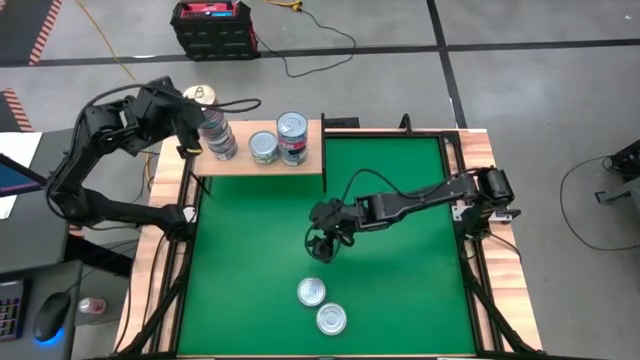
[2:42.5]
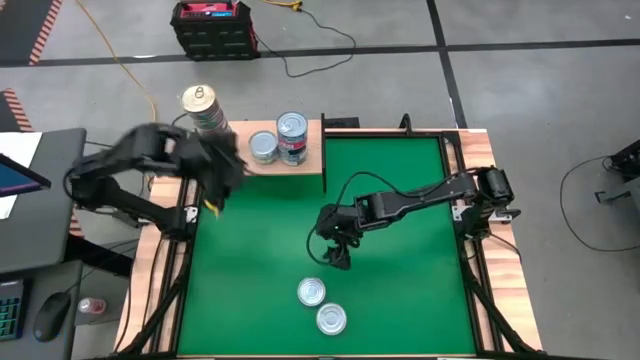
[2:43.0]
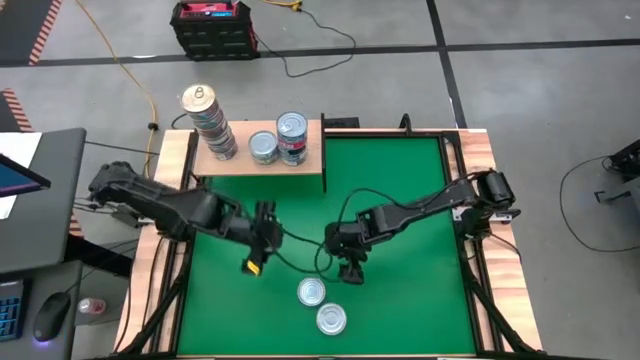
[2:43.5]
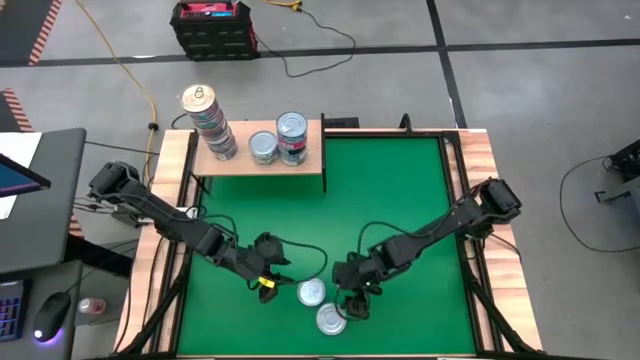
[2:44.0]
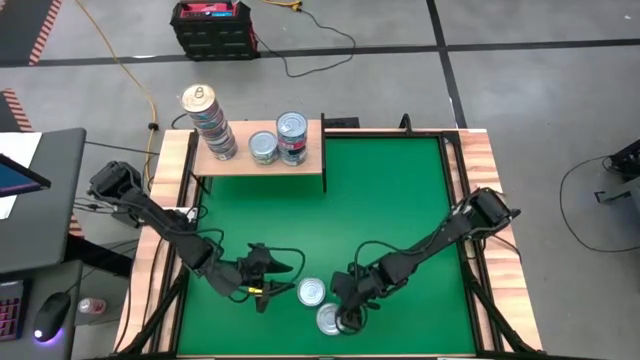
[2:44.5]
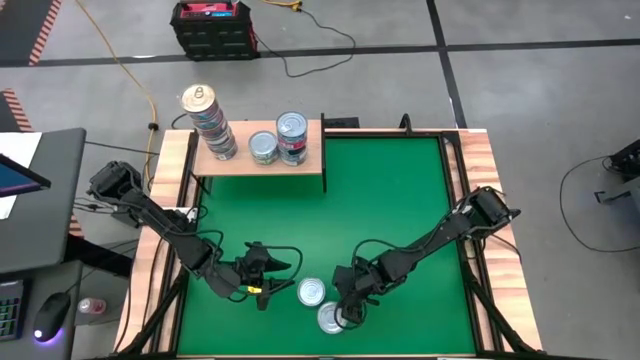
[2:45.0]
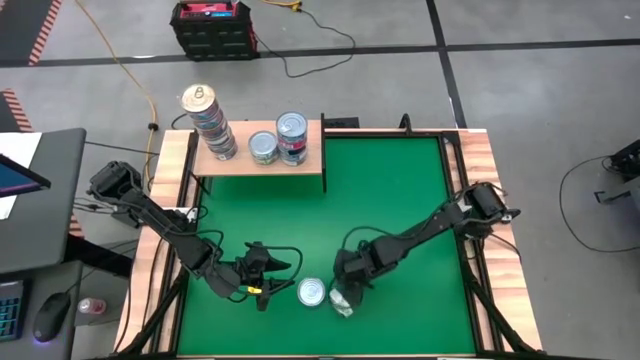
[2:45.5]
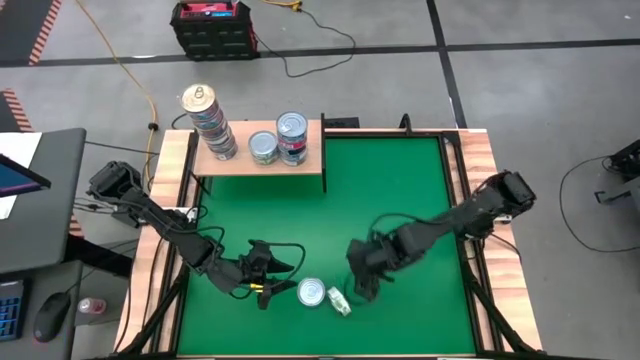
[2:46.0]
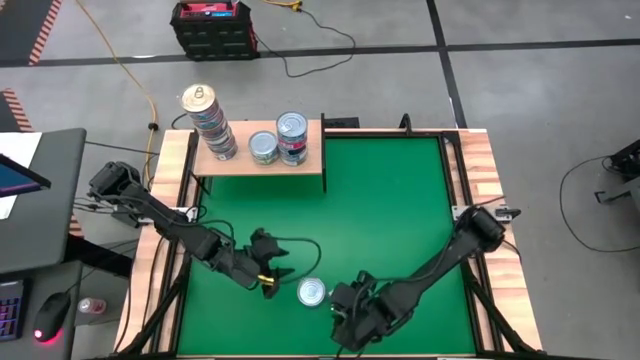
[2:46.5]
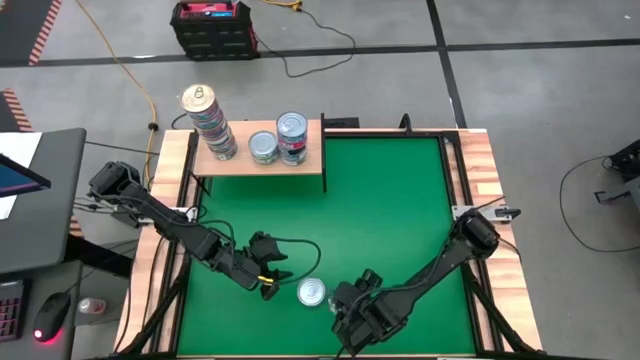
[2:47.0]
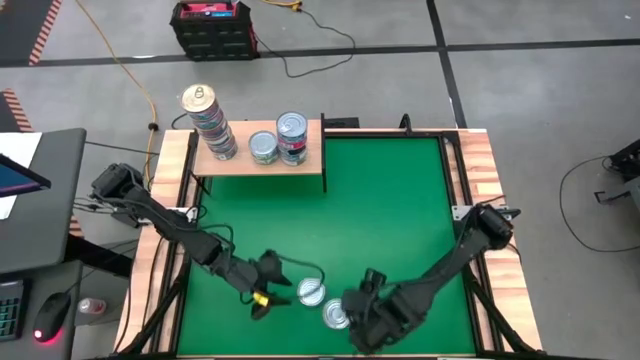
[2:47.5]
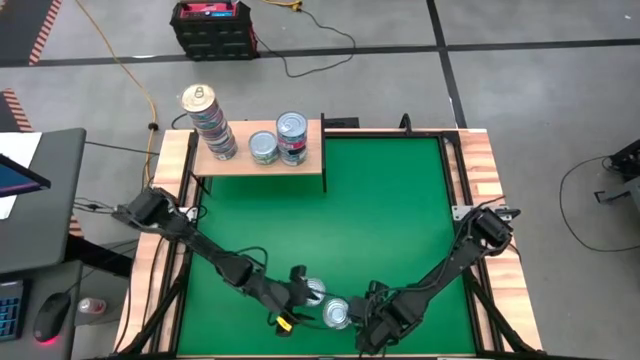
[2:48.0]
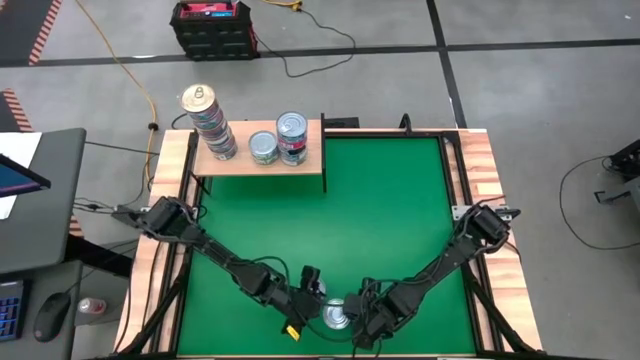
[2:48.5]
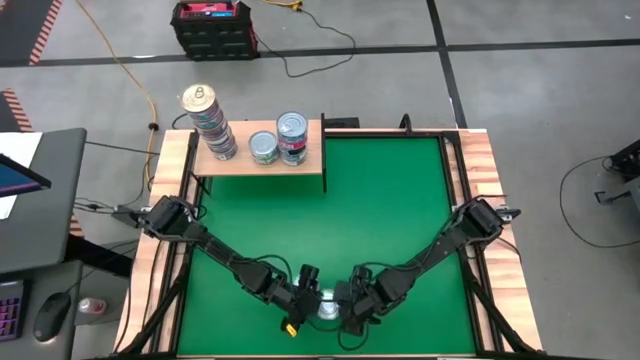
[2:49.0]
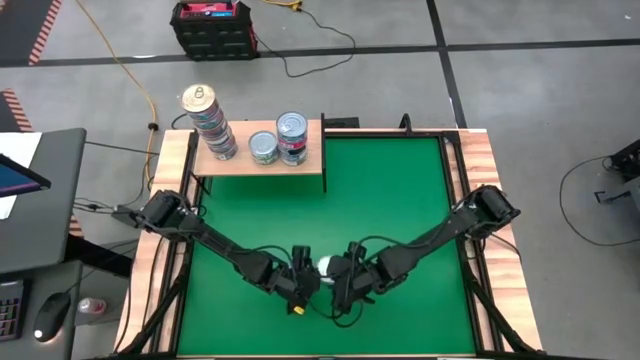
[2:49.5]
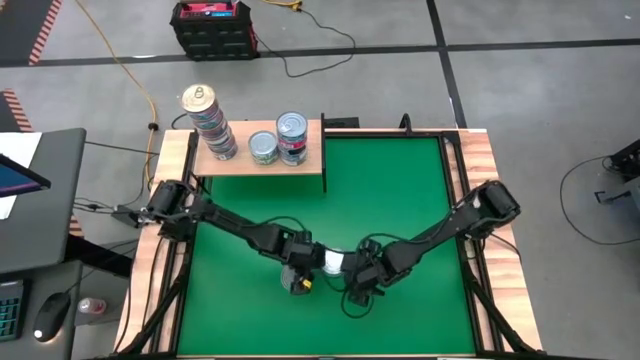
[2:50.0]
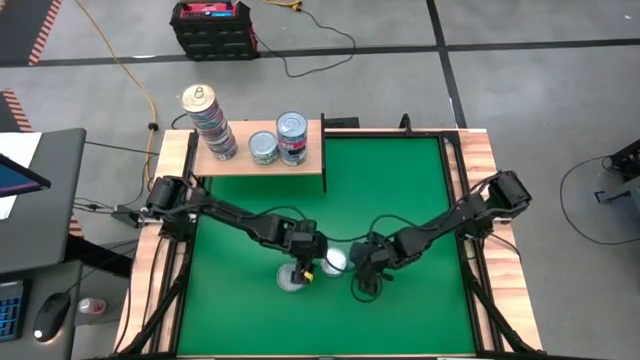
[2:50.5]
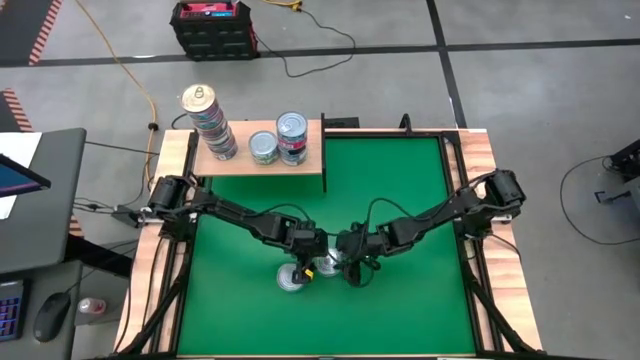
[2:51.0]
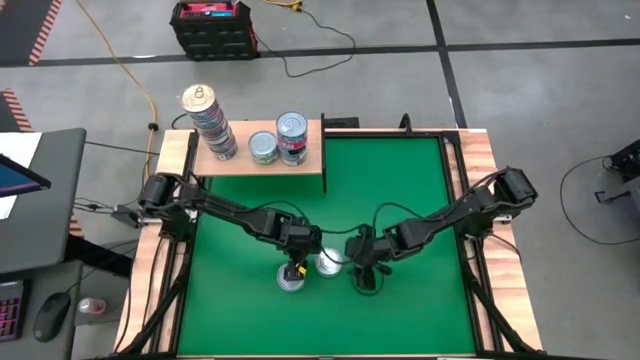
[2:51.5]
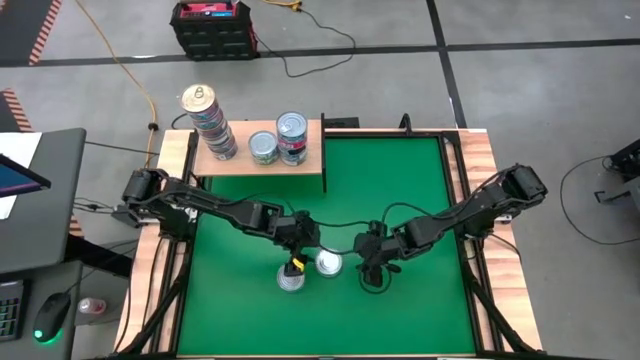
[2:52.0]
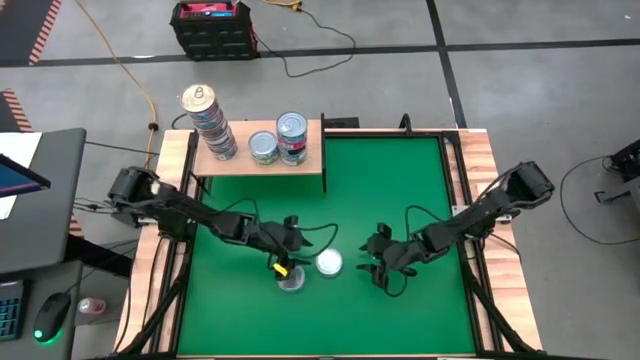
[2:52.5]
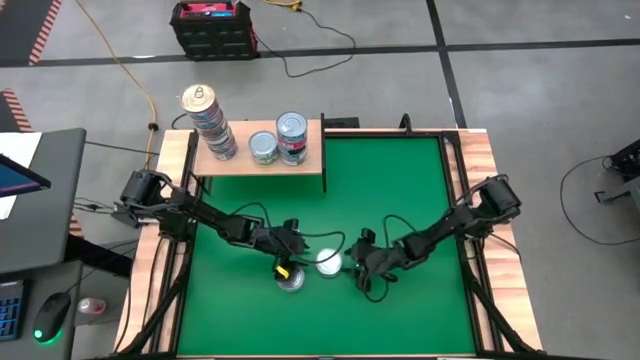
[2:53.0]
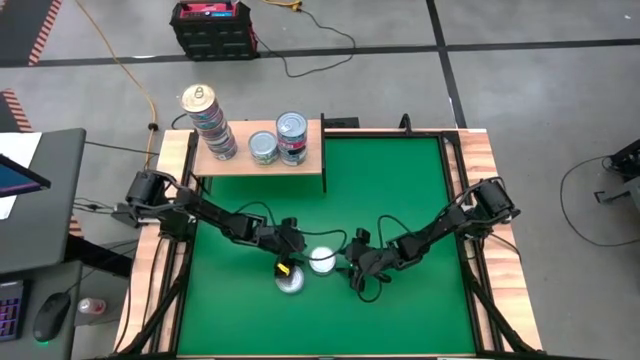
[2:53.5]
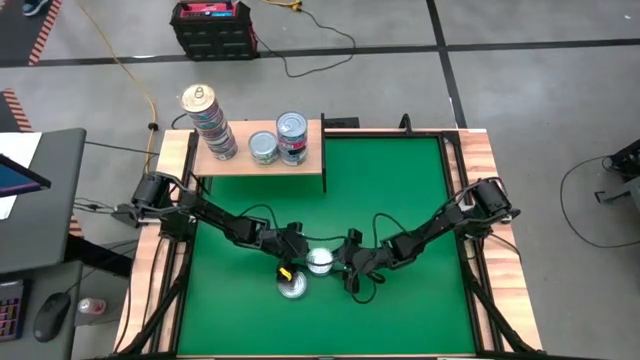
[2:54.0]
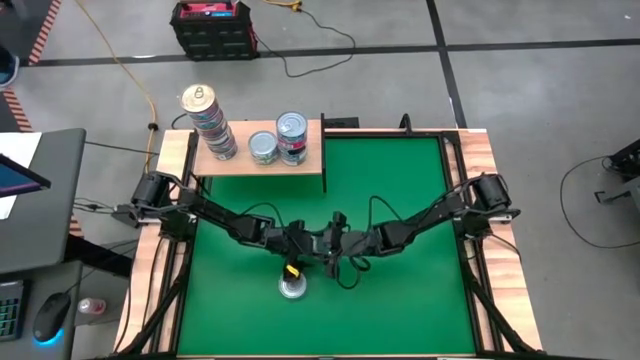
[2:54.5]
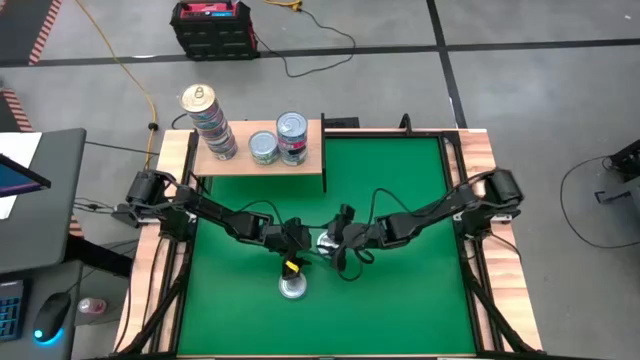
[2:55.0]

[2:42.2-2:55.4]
Task: Stack canned seafood by type on shelf
Stack the green tuna can on top of the green tuna cans on the shelf

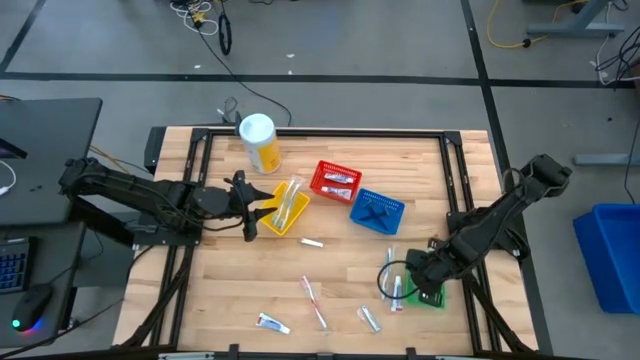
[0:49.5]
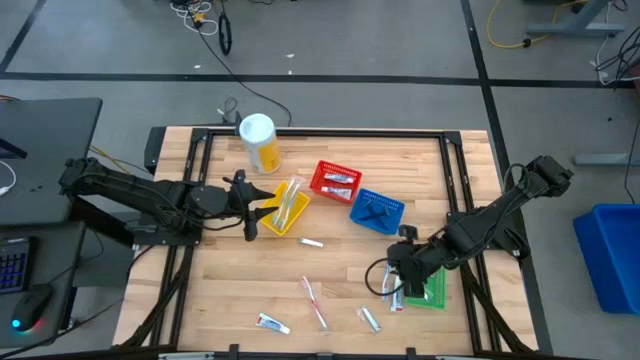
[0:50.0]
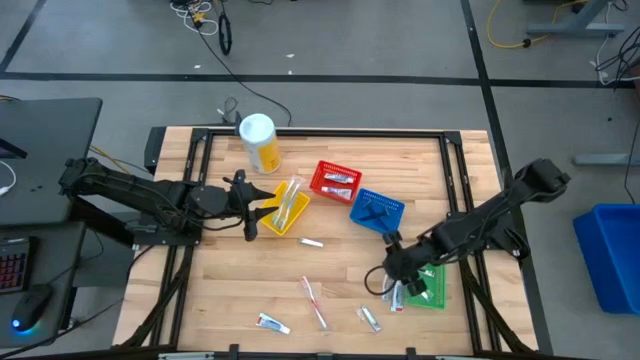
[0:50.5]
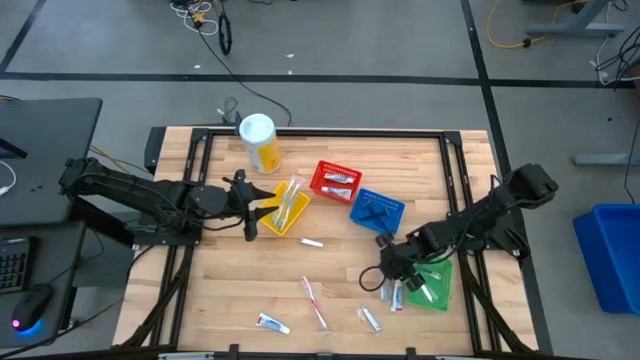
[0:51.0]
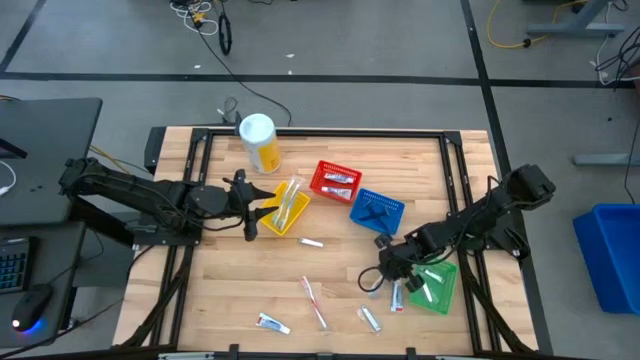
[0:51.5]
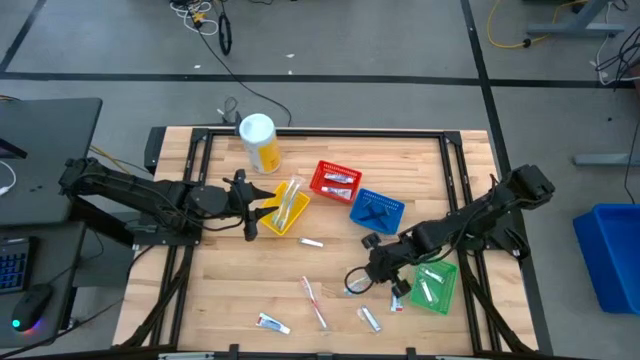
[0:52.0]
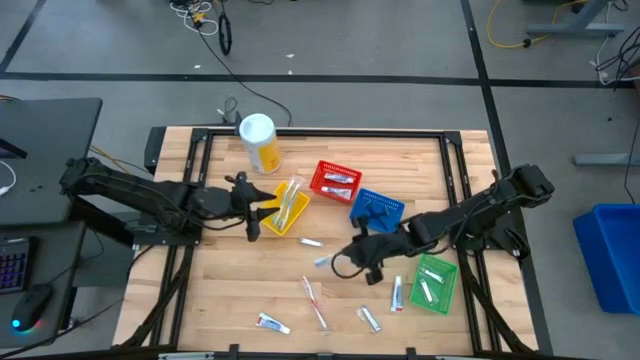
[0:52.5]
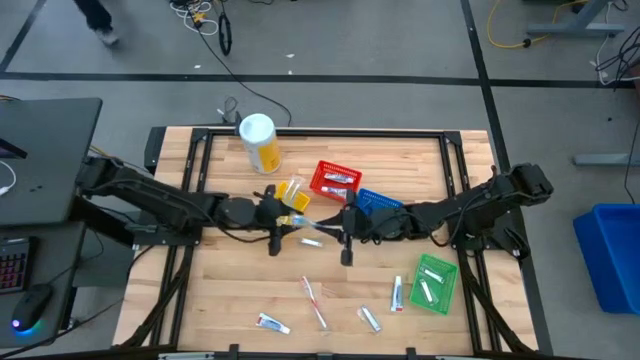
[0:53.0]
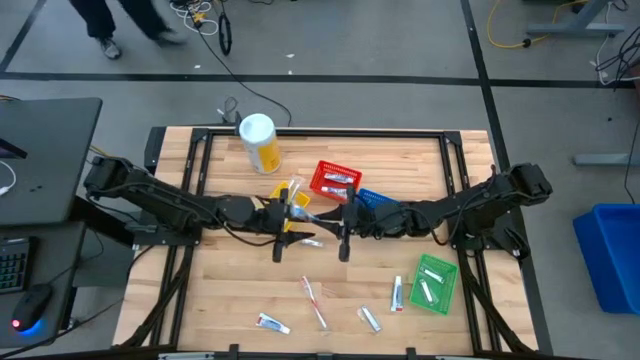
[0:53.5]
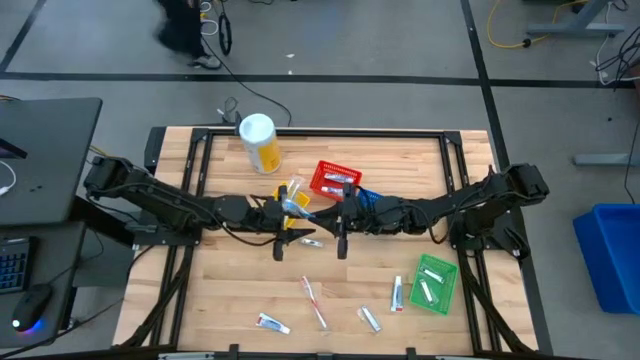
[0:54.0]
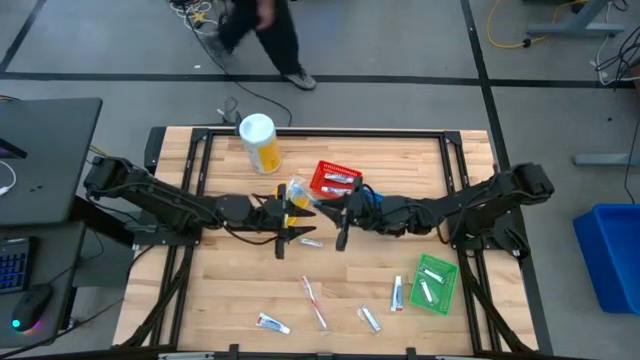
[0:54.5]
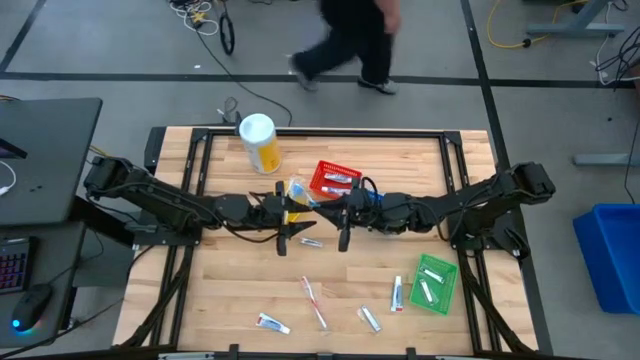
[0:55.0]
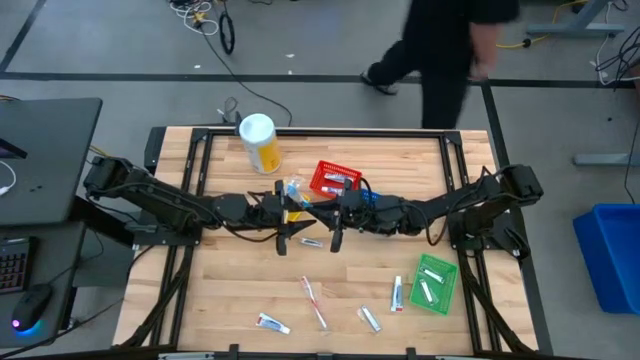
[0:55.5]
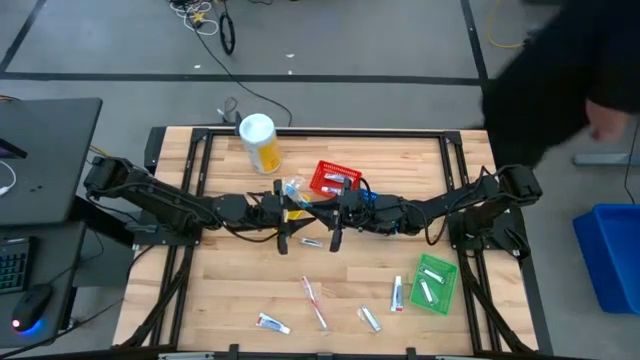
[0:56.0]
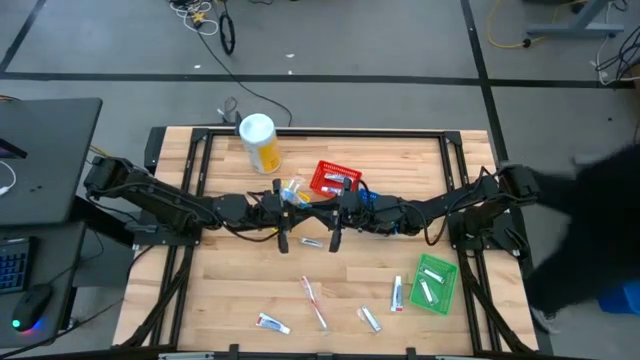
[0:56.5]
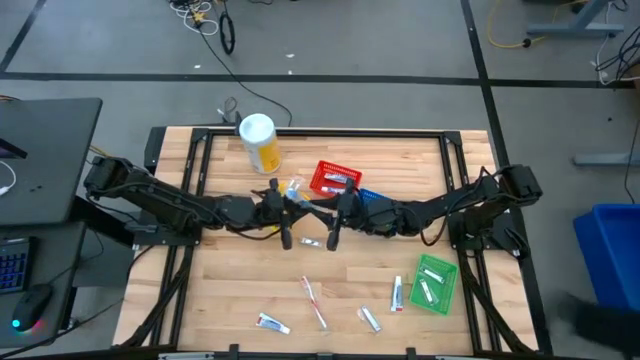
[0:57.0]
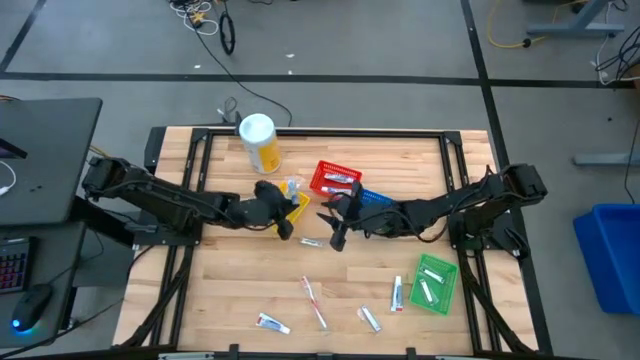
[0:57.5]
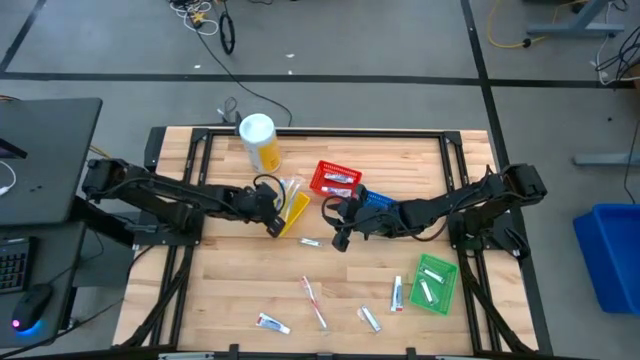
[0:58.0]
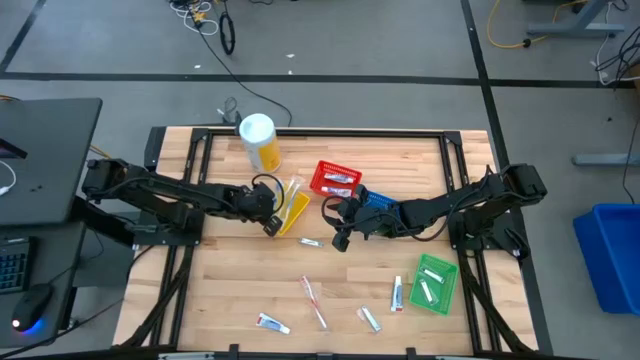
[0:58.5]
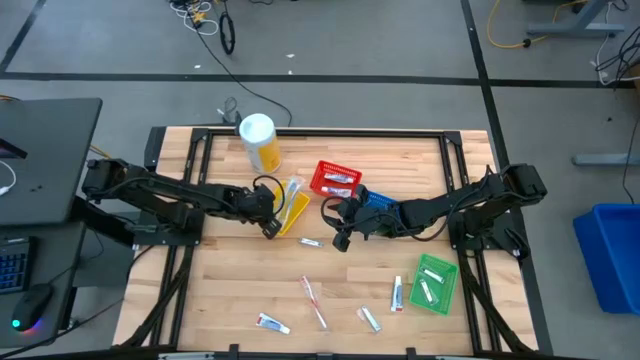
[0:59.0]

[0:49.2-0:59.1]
Task: Pick & Place Travel size toiletries
Put the blue toothbrush into the yellow bin
